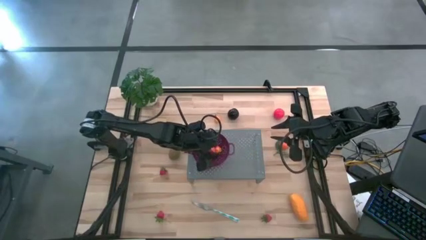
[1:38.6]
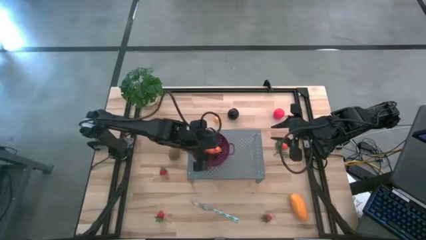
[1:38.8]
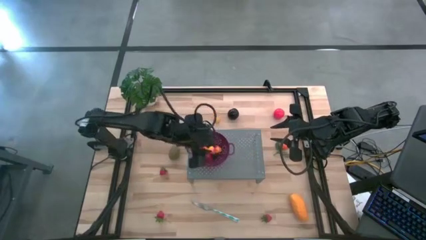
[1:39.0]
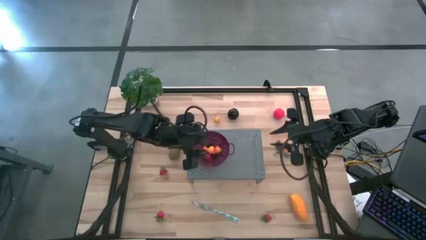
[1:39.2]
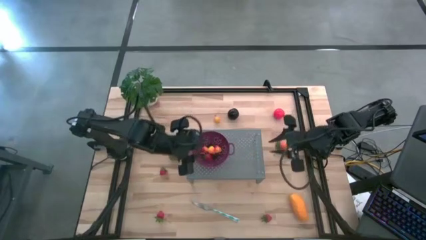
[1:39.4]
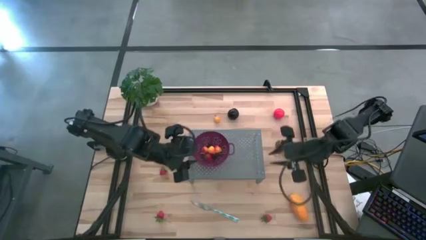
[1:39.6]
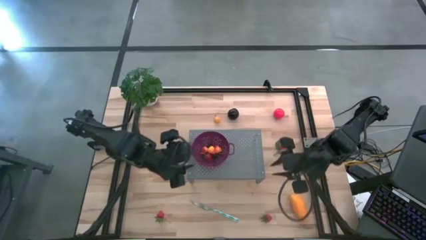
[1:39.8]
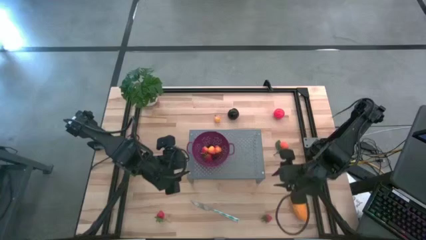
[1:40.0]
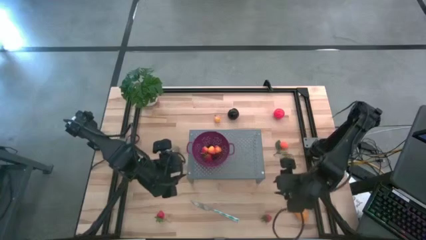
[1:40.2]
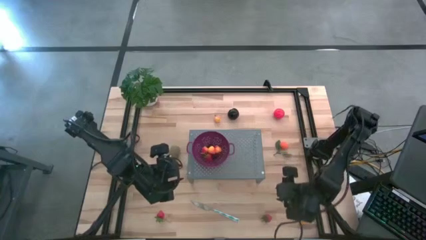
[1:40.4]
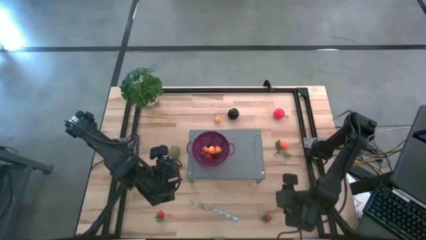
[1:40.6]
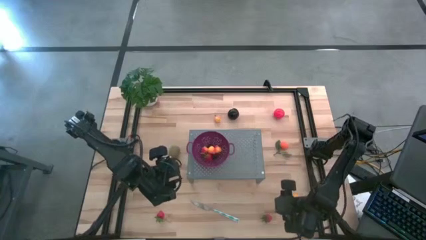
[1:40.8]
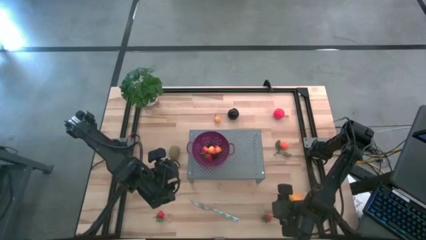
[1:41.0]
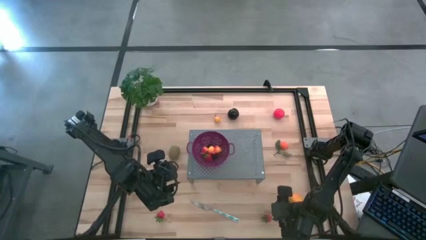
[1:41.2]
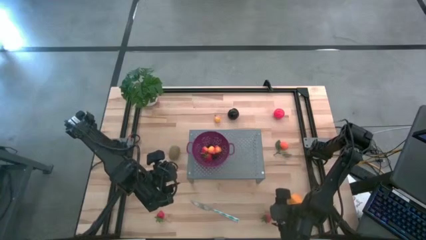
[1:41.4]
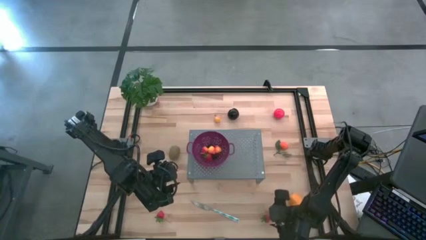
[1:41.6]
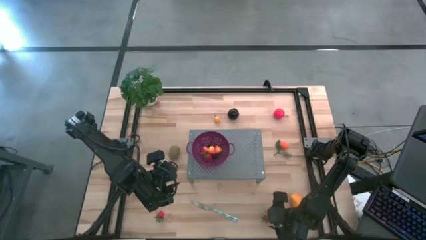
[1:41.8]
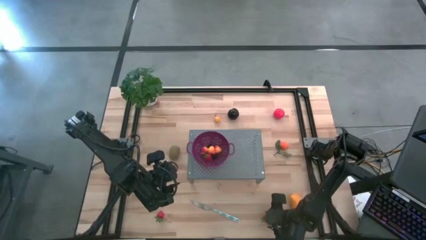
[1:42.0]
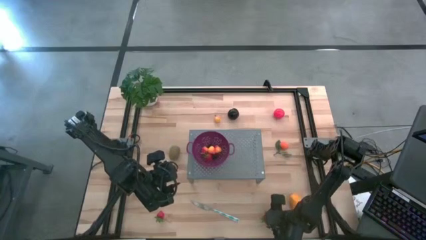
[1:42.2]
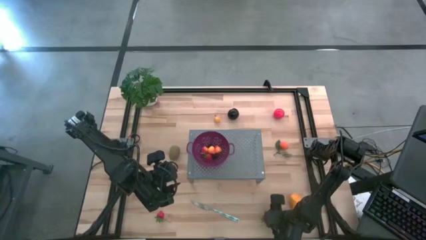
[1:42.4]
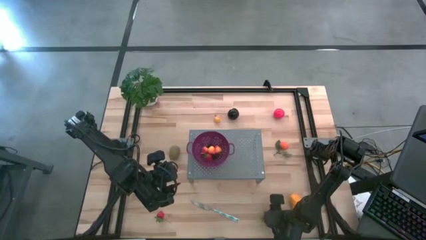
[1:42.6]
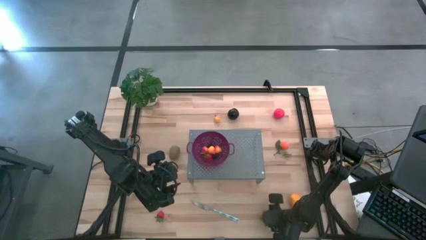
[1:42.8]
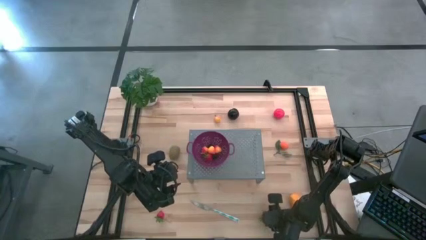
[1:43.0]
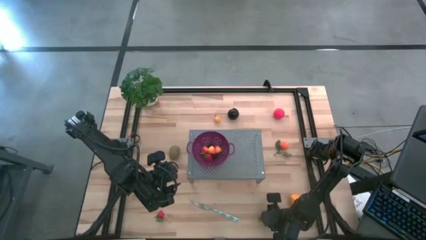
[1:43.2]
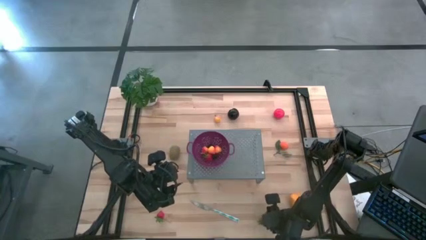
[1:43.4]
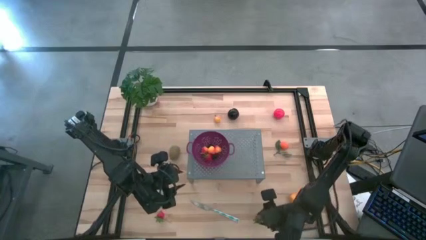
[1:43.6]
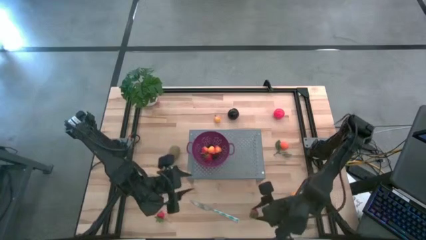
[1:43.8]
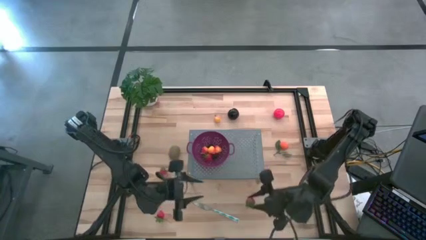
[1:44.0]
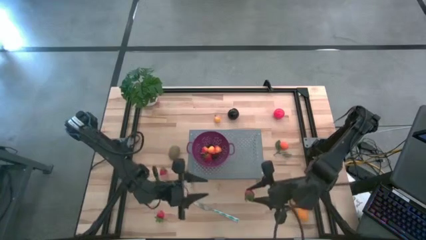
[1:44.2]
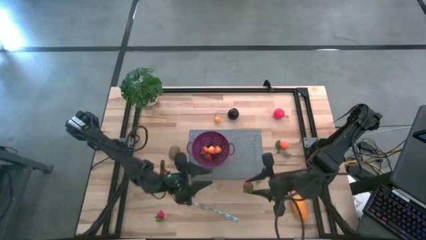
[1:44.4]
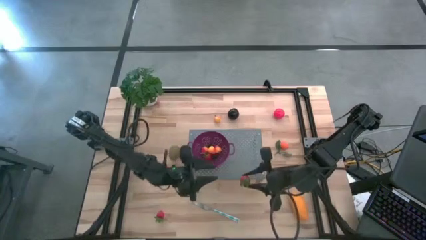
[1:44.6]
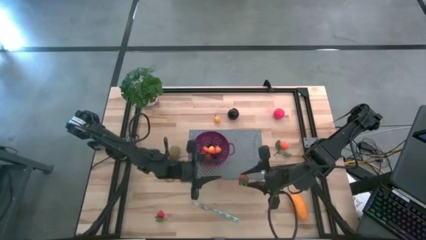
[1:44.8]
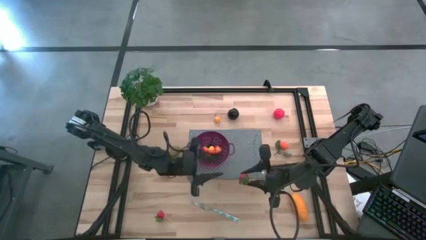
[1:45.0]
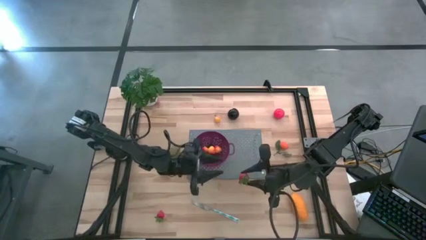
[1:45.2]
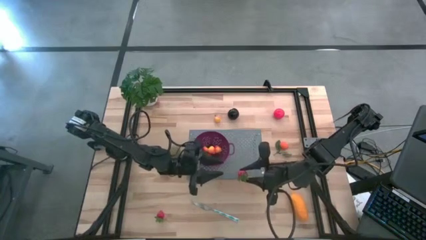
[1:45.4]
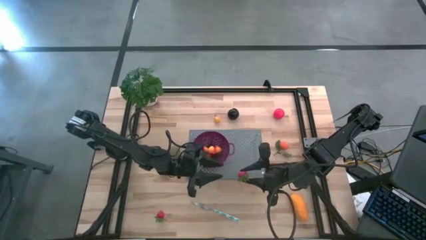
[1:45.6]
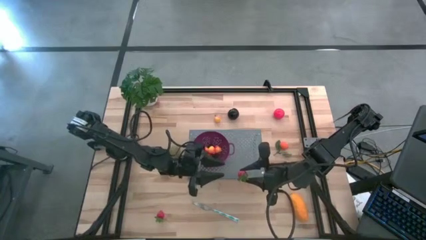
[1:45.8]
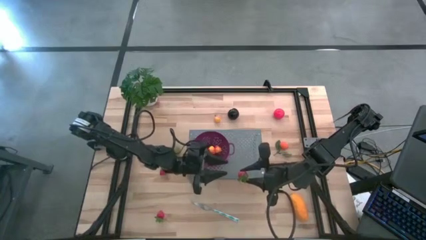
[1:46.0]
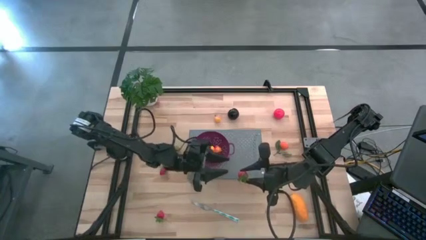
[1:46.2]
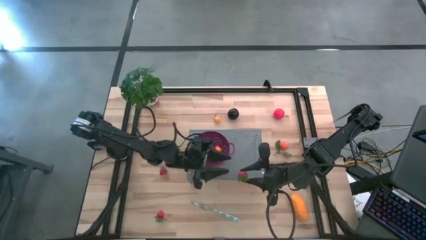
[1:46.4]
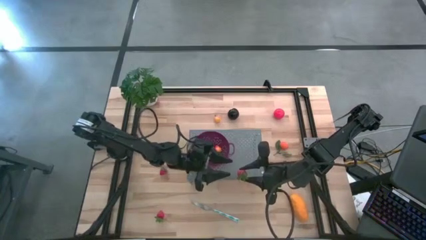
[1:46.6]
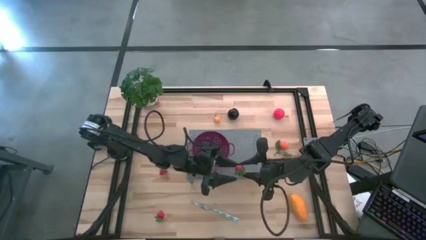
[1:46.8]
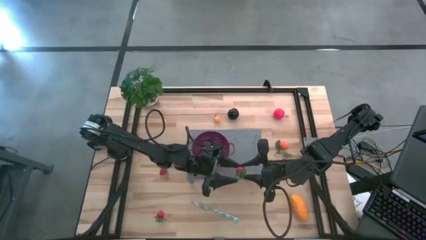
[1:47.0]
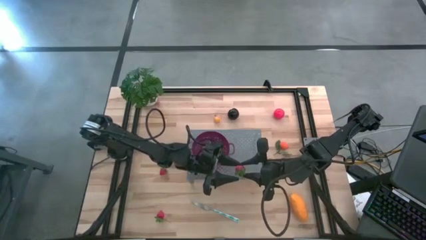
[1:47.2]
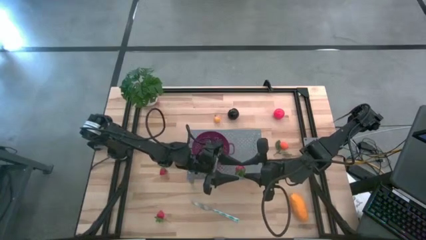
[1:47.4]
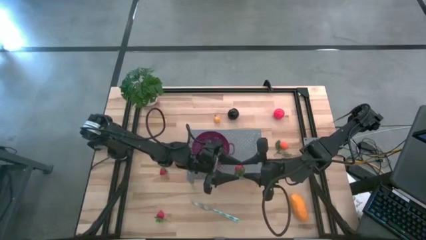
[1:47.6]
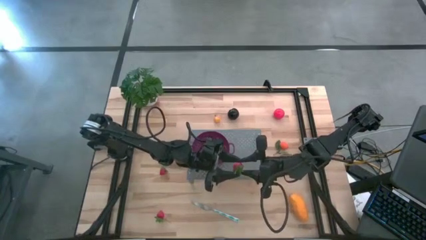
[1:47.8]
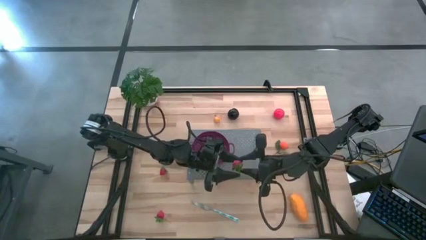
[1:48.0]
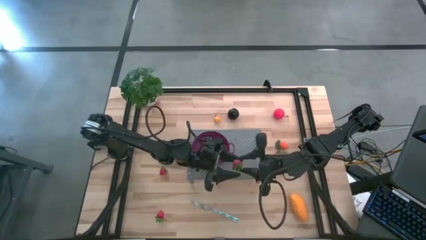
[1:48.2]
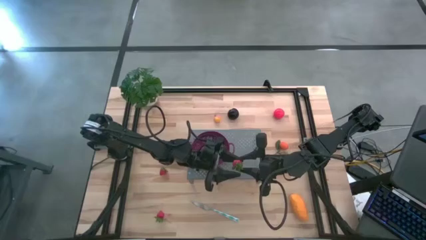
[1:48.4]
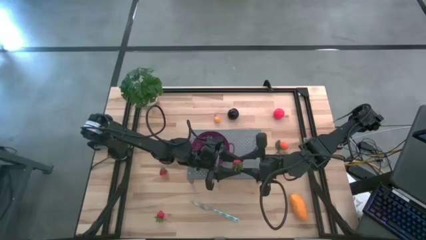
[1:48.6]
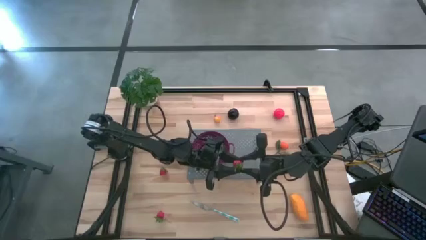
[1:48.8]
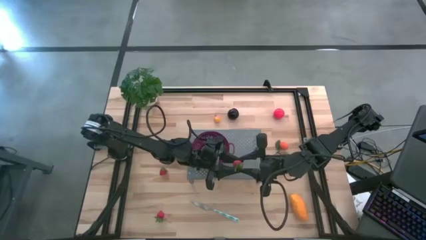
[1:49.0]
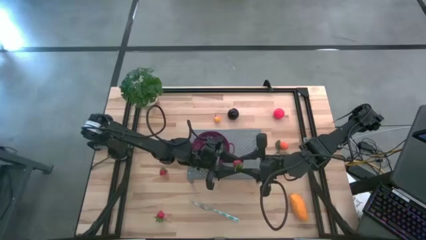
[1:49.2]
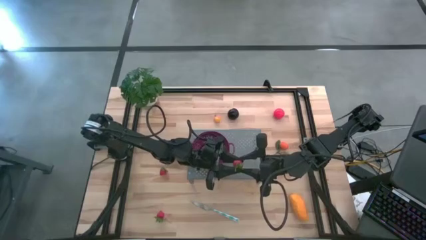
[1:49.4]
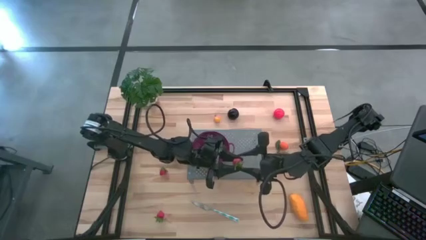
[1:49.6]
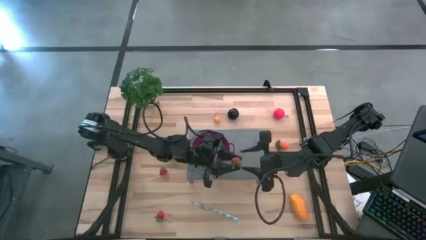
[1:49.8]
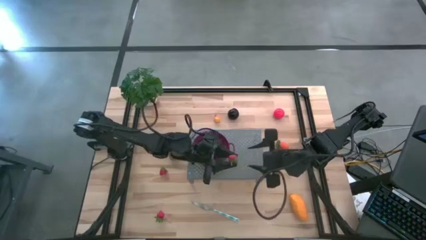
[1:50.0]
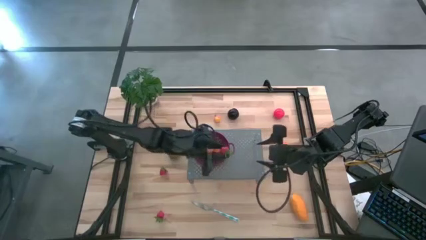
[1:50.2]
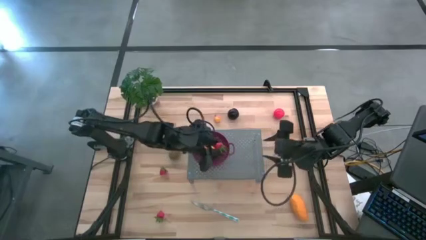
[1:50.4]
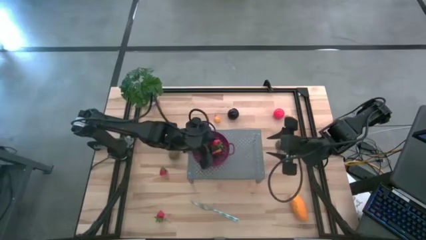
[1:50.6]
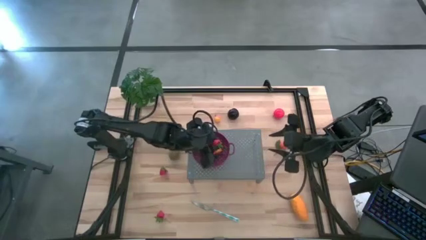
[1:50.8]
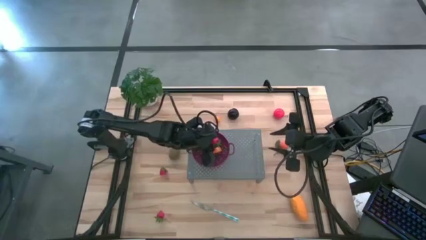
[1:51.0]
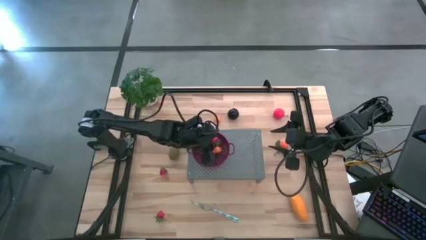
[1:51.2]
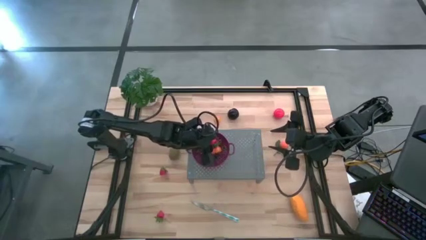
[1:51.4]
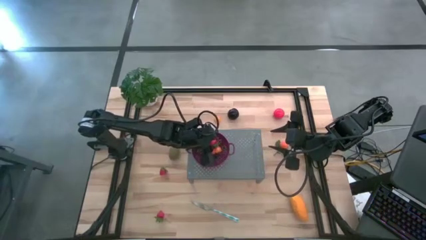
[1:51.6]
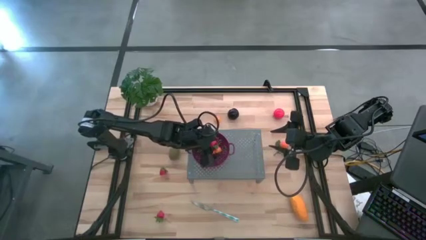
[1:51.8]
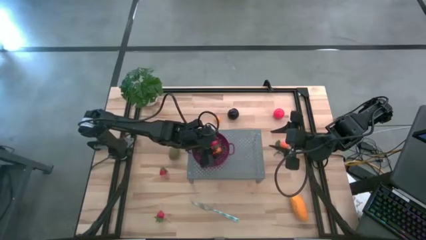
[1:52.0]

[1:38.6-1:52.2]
Task: Pick & Place Fruit
Put the strawberry into the purple strainer bowl

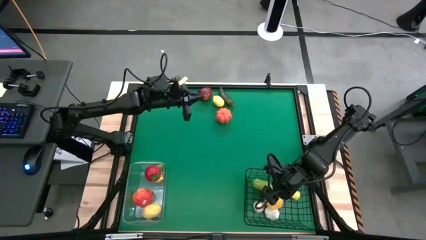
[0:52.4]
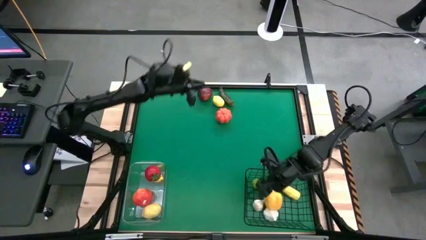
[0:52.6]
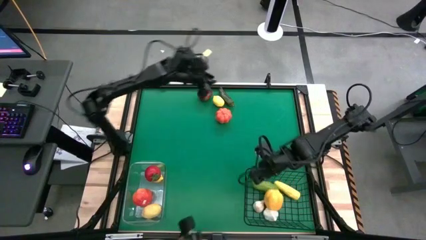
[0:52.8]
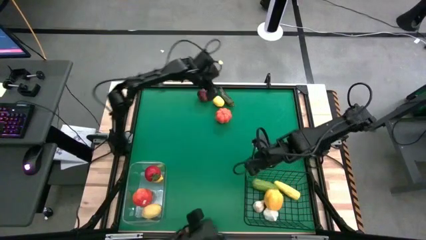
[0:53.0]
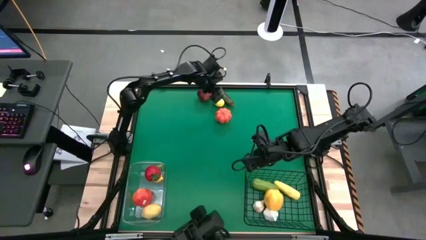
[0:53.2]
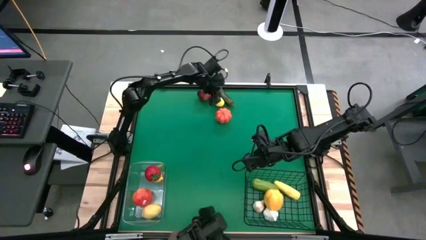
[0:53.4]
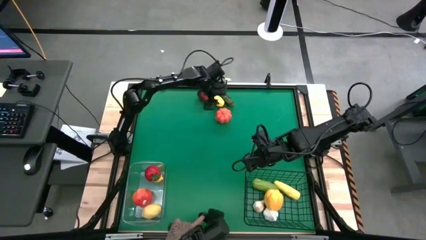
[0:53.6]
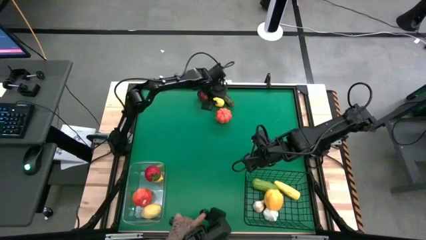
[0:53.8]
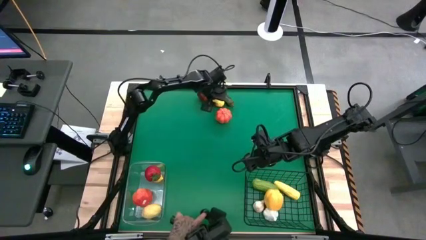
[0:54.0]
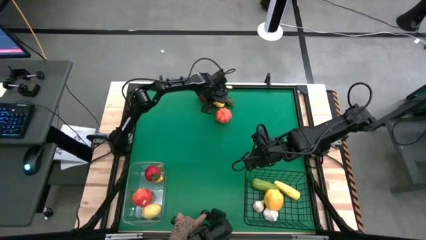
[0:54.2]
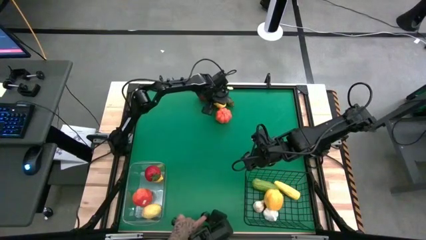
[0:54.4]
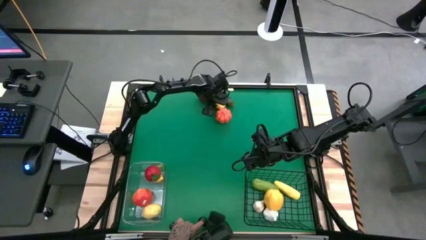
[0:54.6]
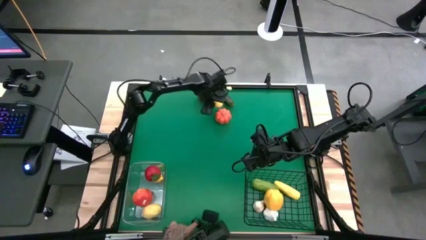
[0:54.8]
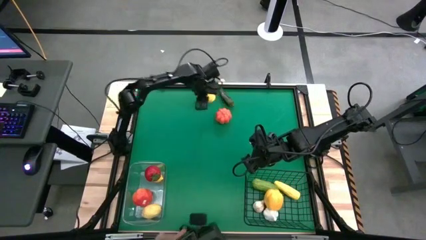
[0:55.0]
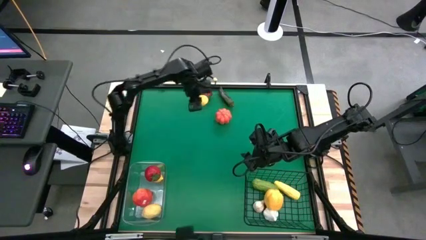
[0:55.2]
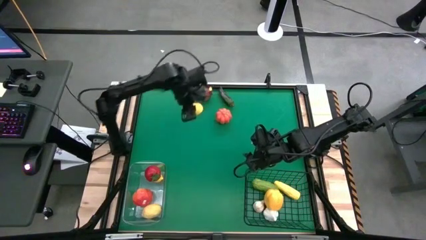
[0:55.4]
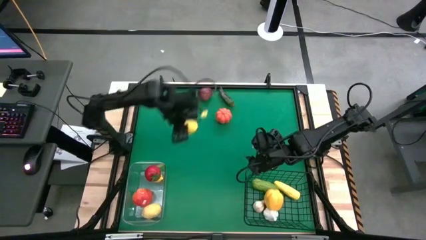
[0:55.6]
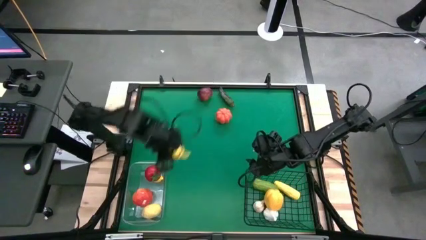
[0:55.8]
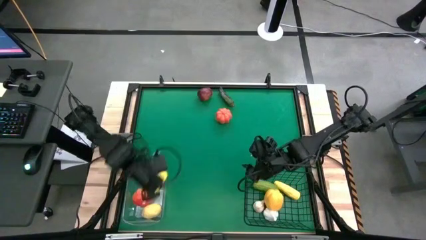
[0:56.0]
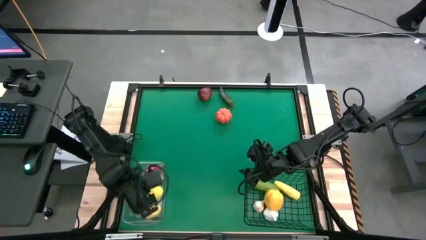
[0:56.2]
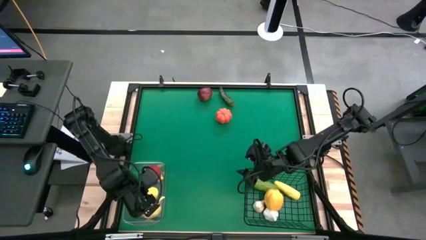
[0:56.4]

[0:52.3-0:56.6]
Task: Sort produce into baskets
Put the lemon into the transparent bin
